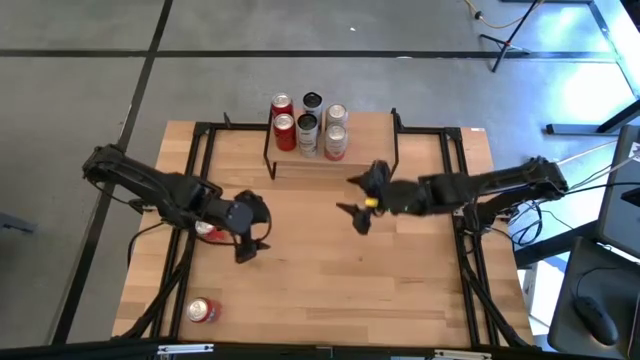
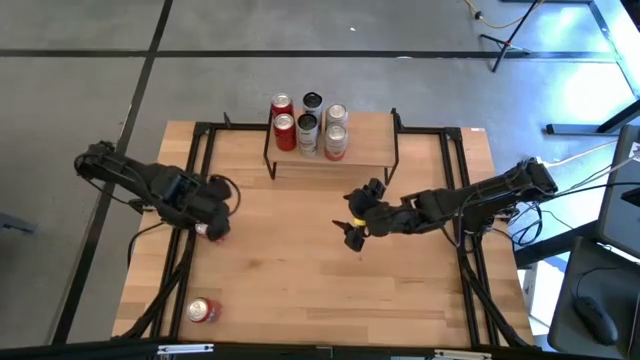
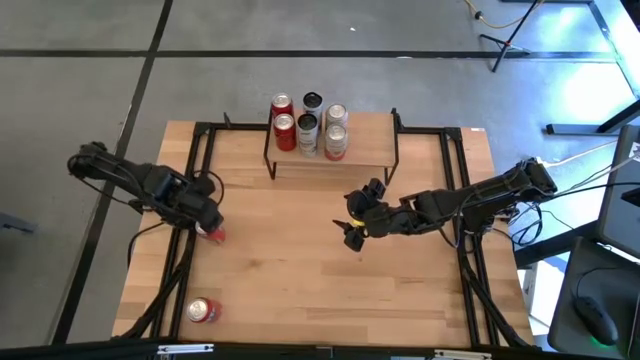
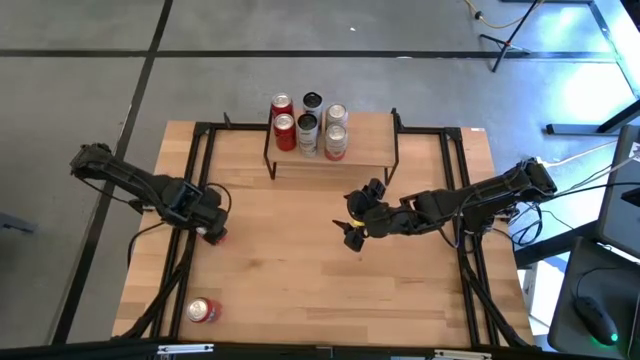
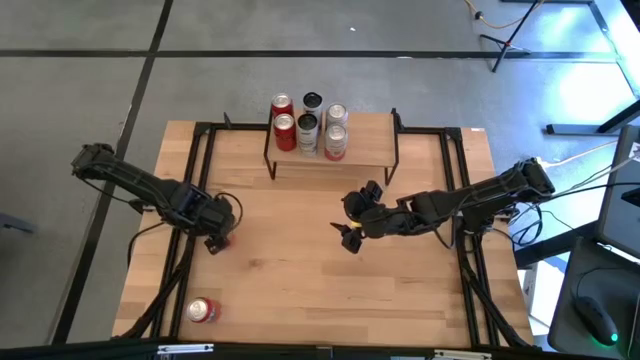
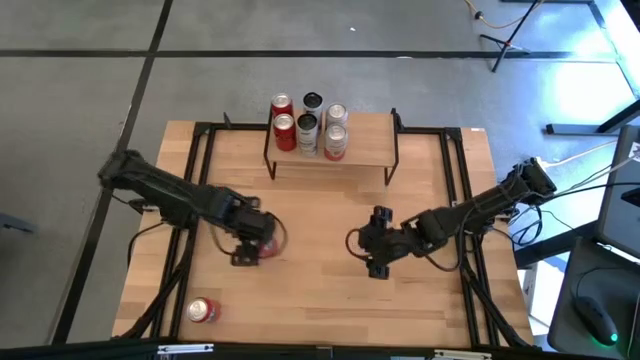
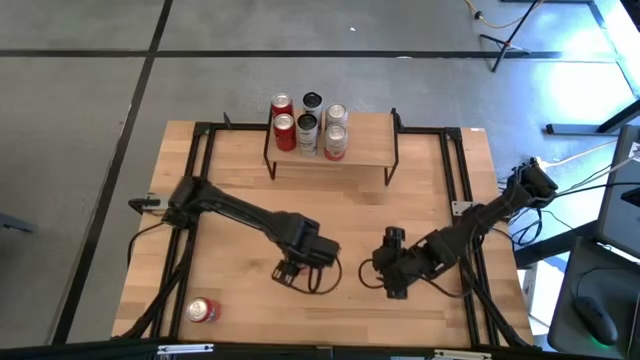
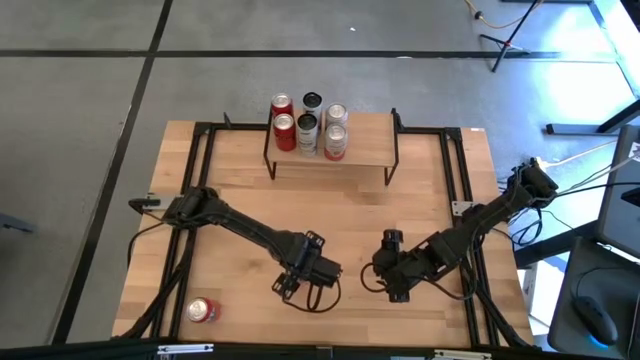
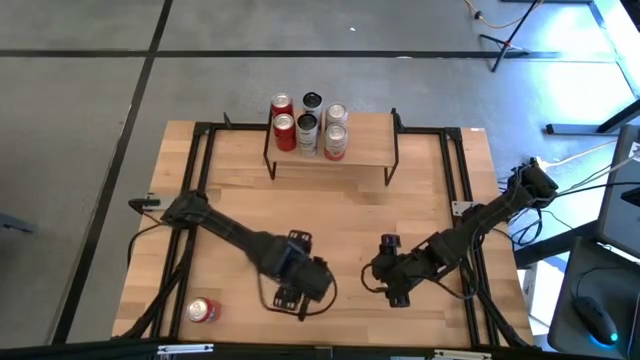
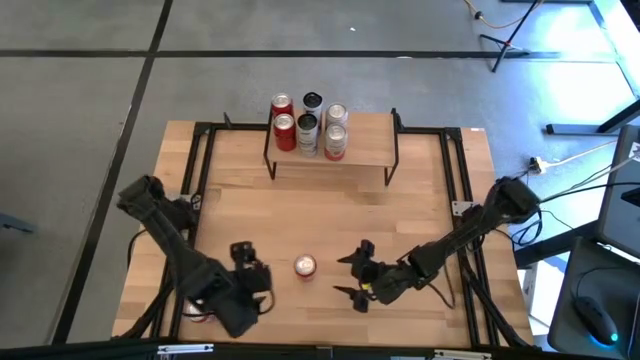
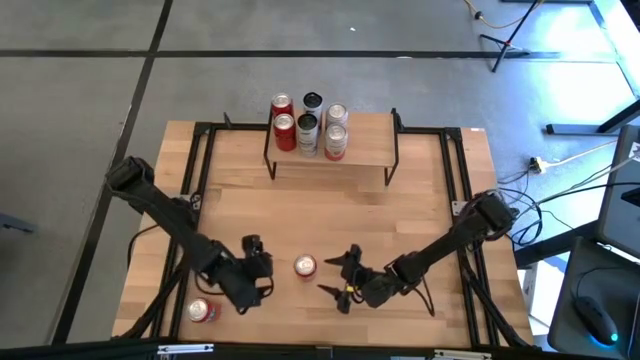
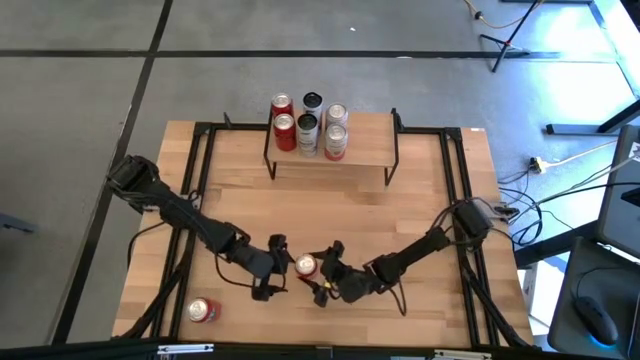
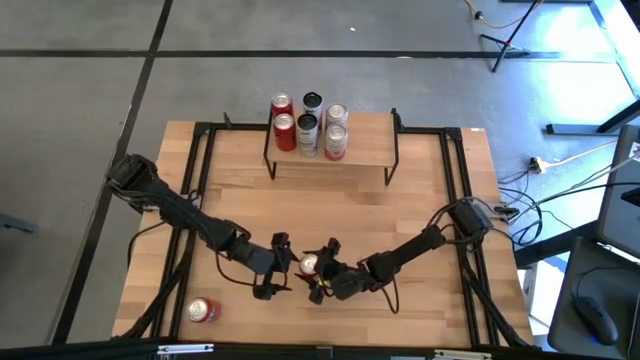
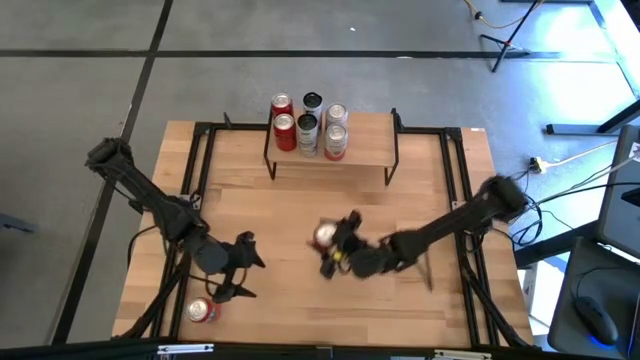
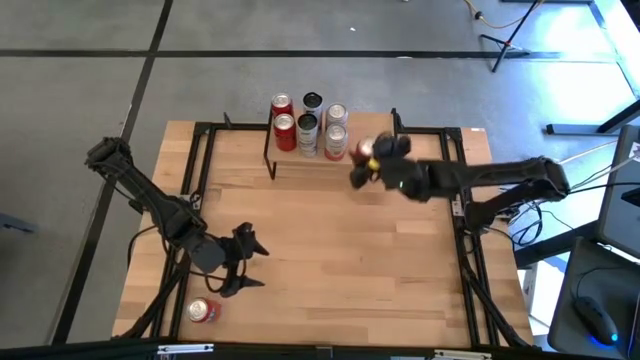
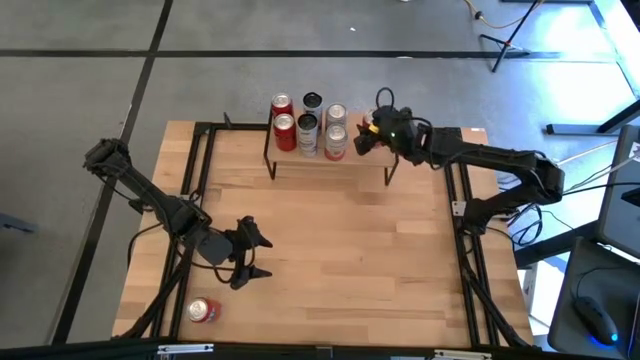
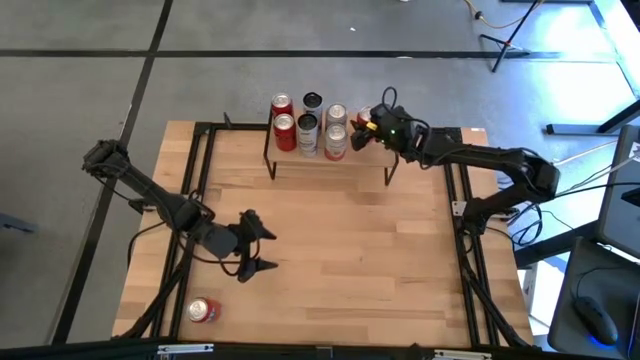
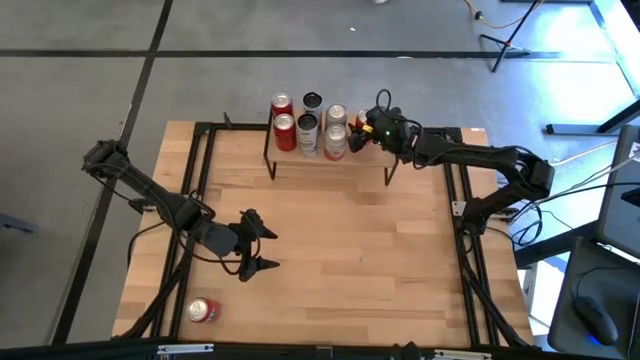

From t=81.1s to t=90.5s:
Task: Place canned beverage on shelf
Put the top red soda can on the shelf

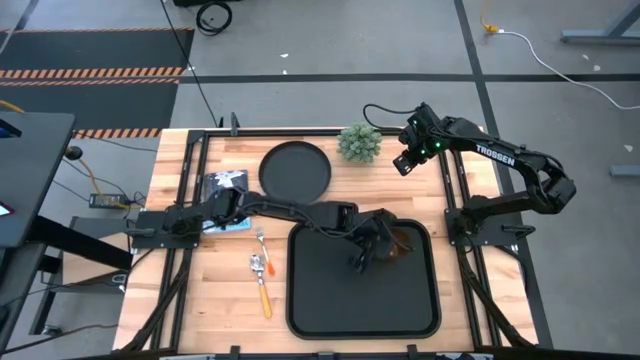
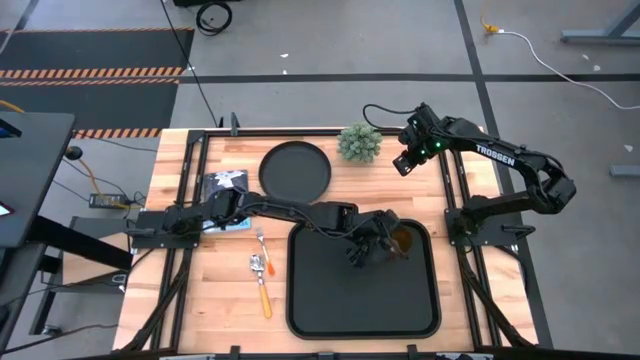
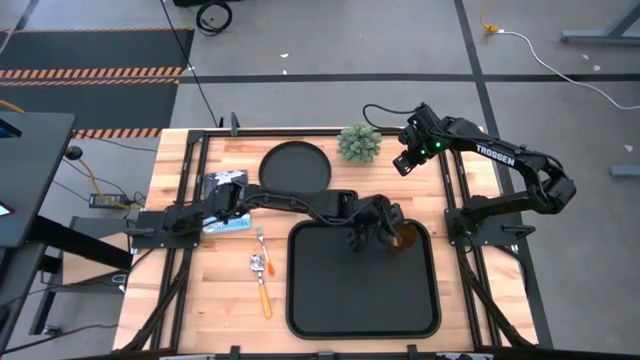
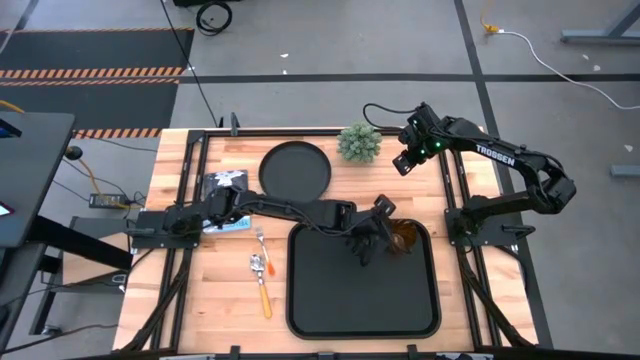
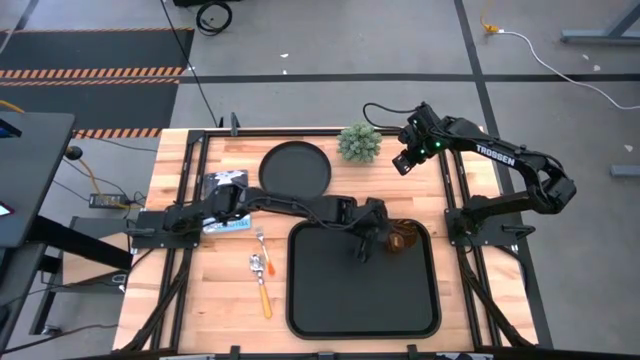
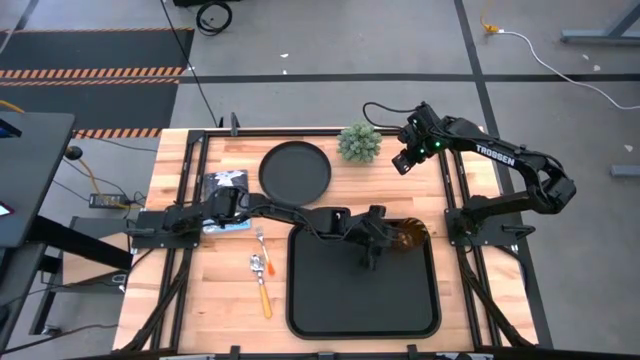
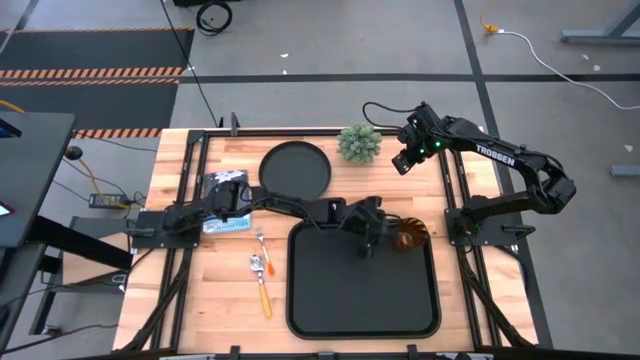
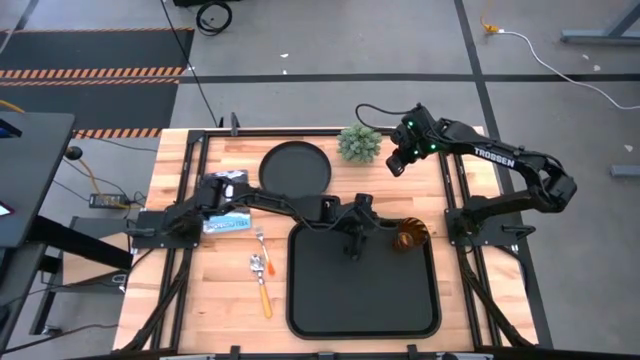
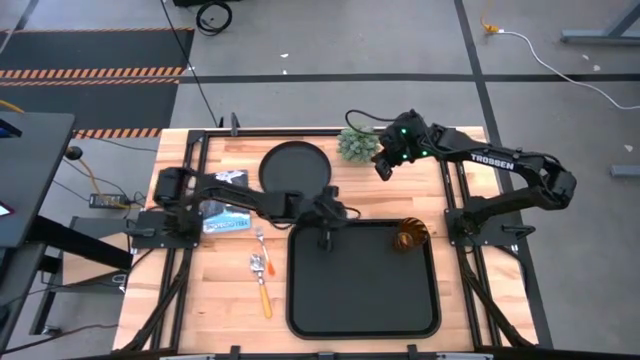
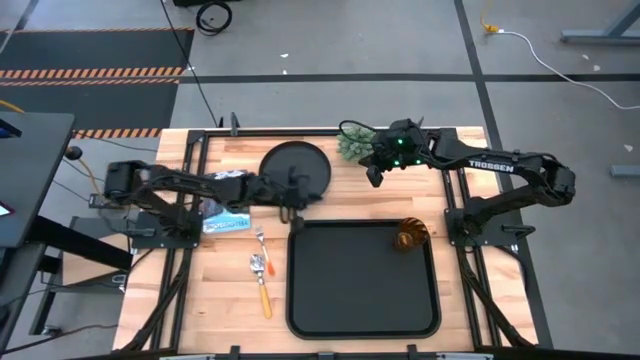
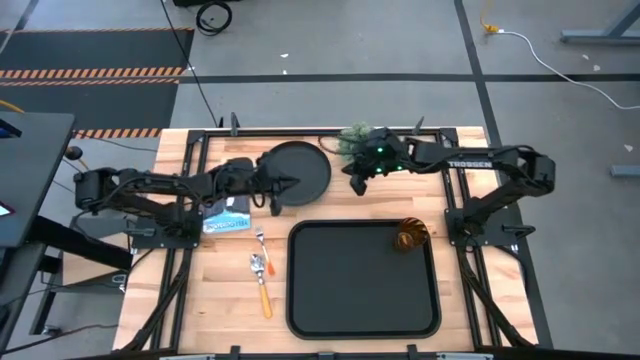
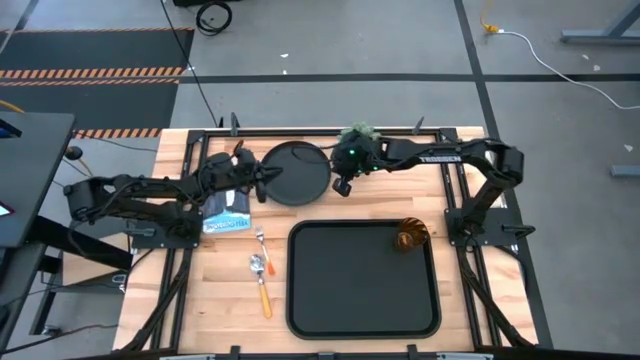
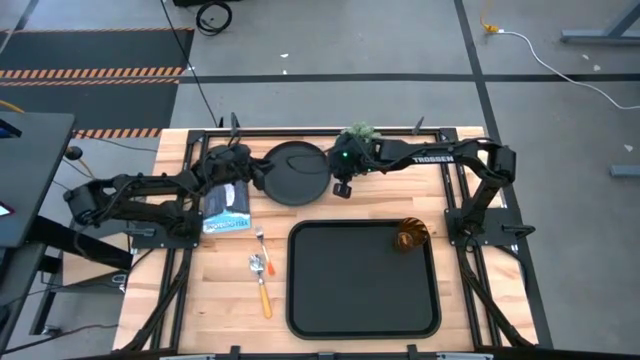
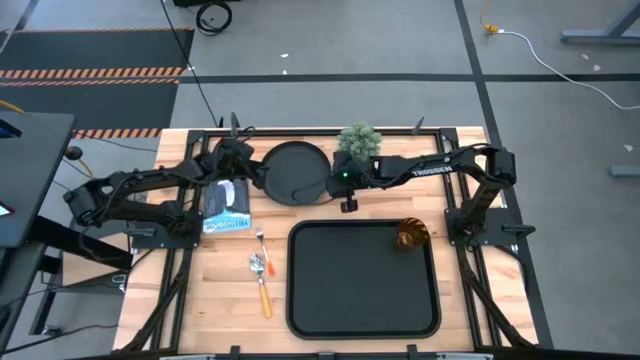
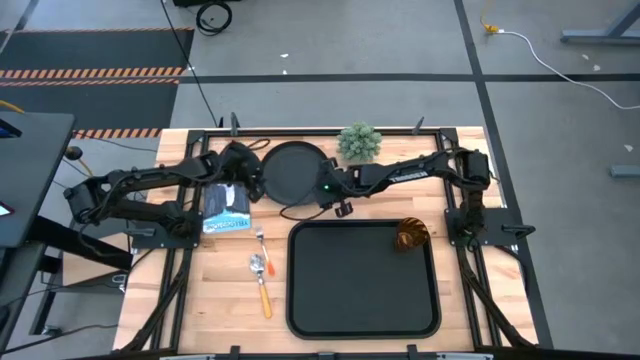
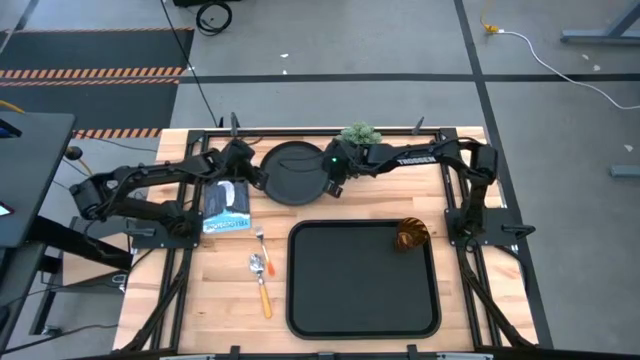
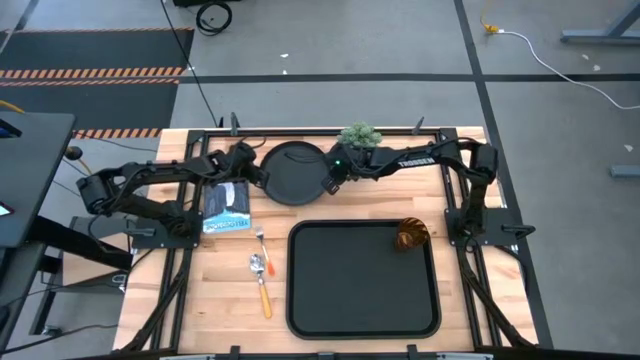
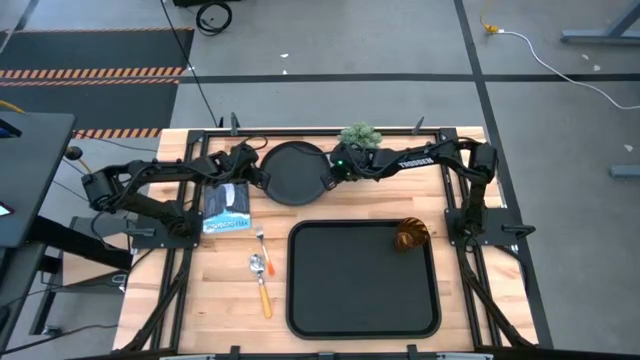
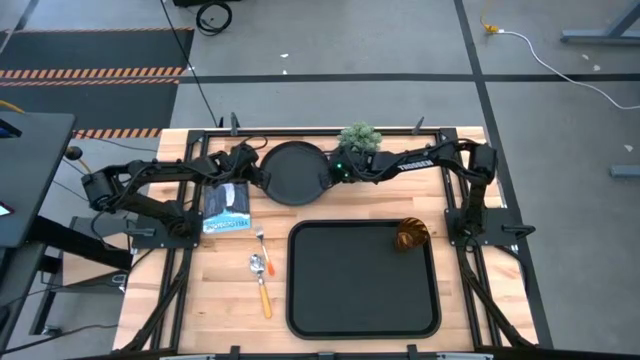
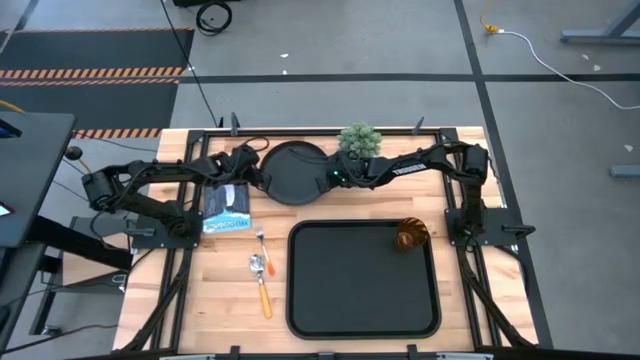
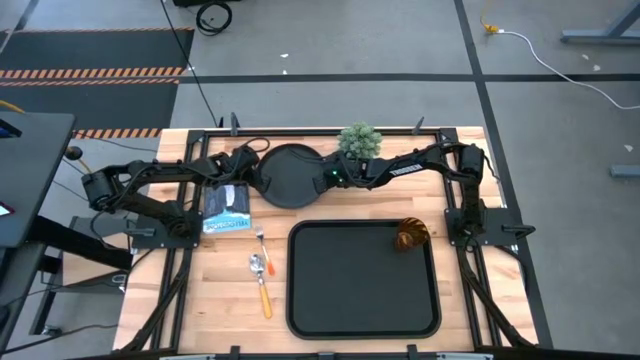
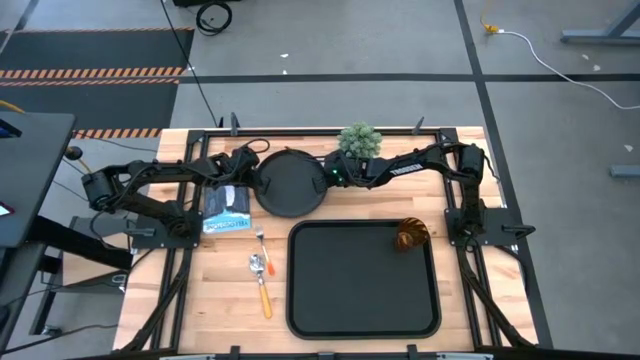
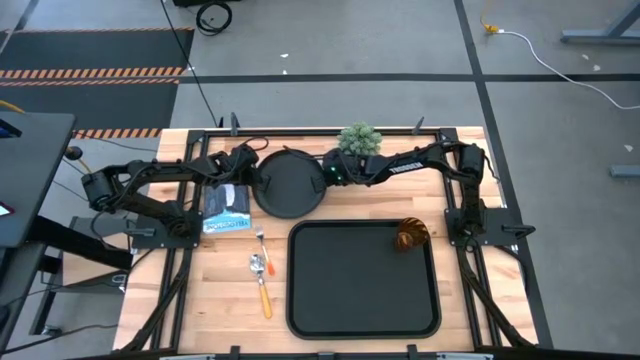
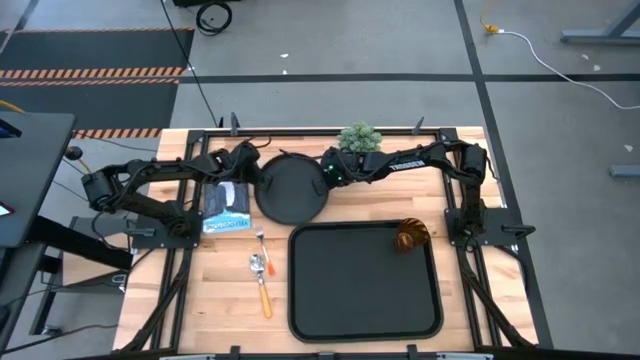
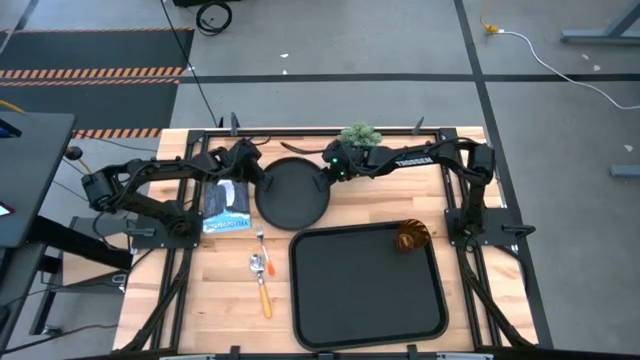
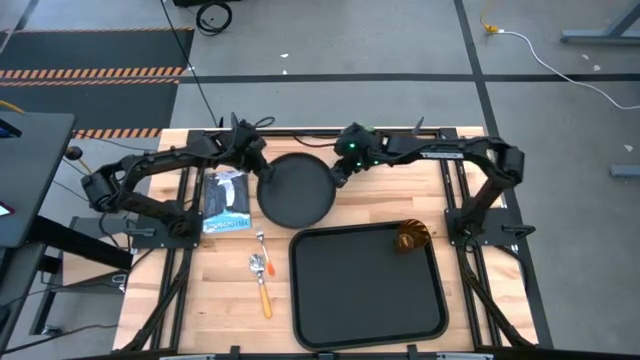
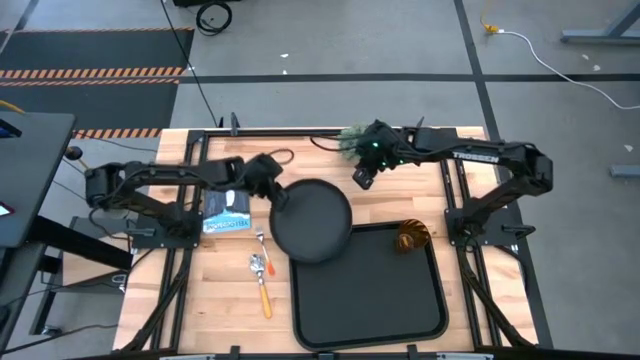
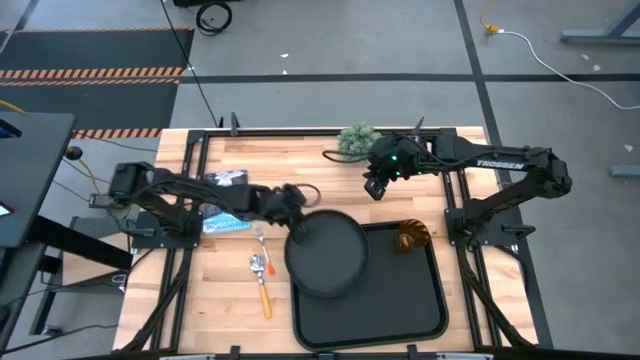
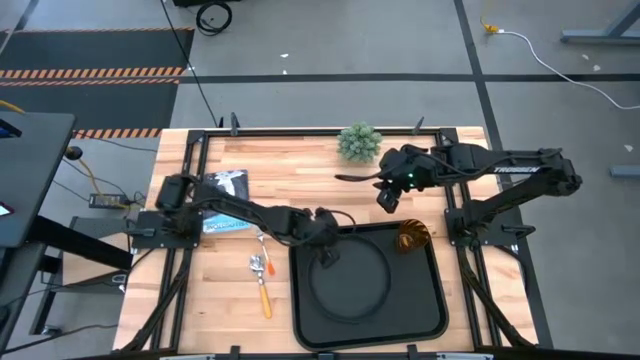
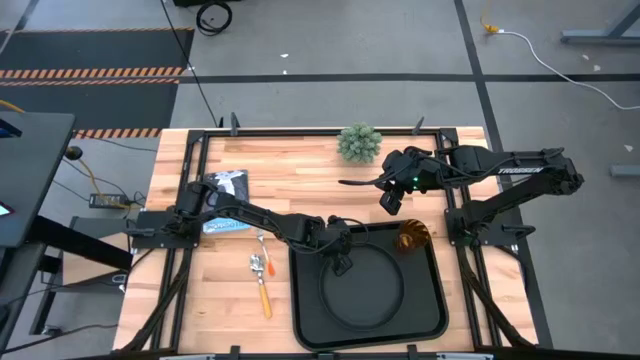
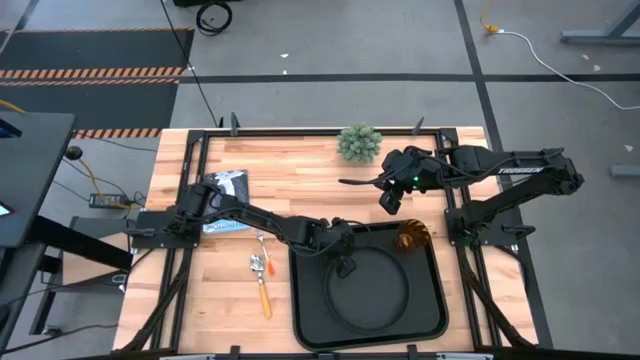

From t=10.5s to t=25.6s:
Task: Pick and place plate/cup/fork/spoon on tray
Put the black plate on the black tray
